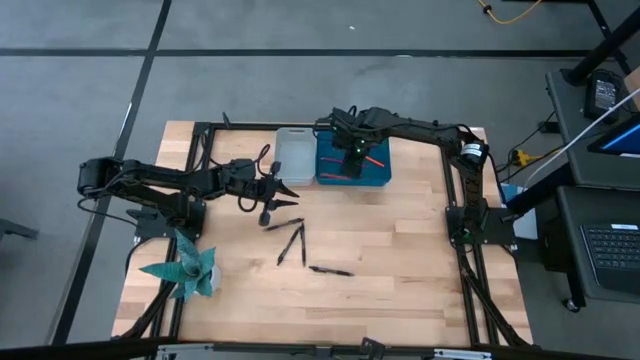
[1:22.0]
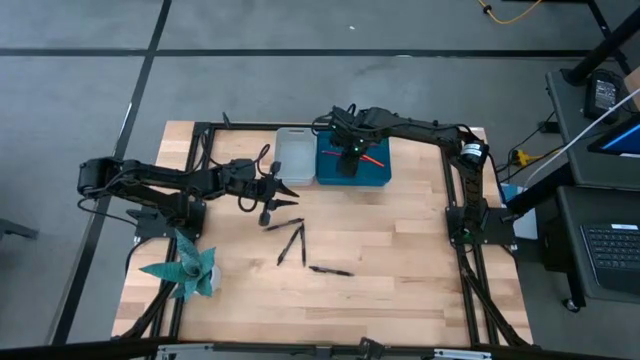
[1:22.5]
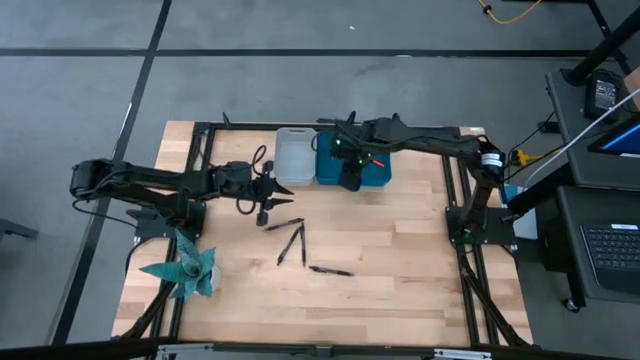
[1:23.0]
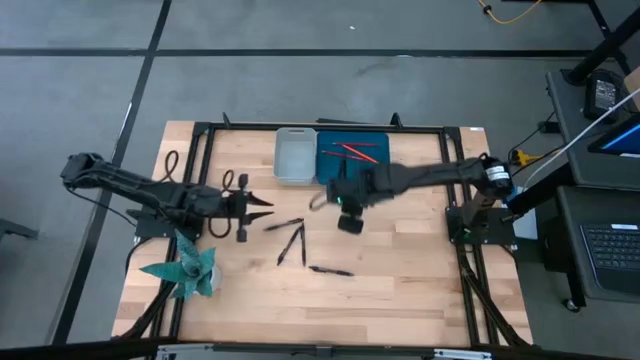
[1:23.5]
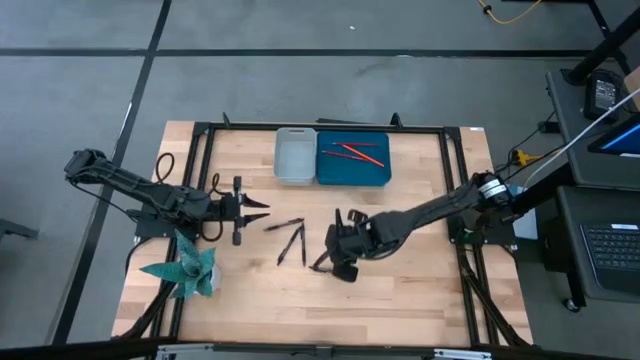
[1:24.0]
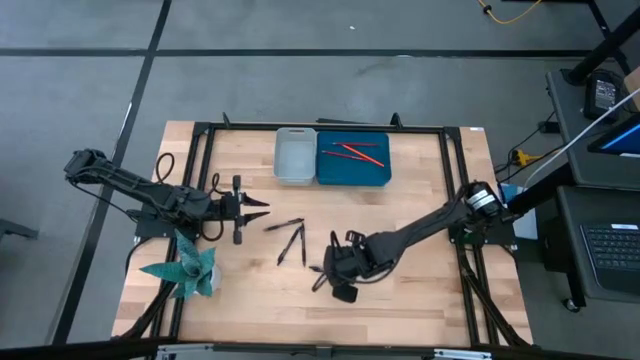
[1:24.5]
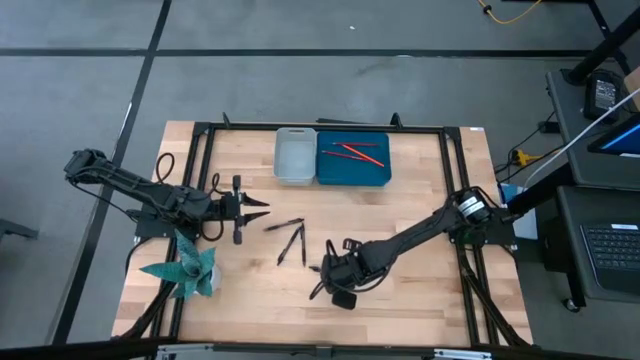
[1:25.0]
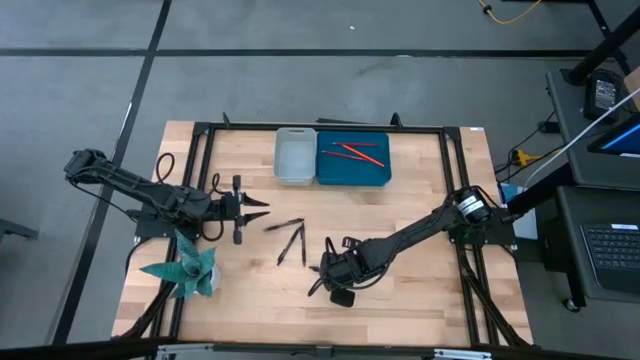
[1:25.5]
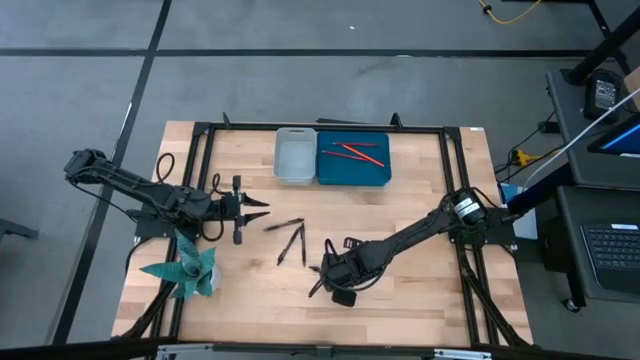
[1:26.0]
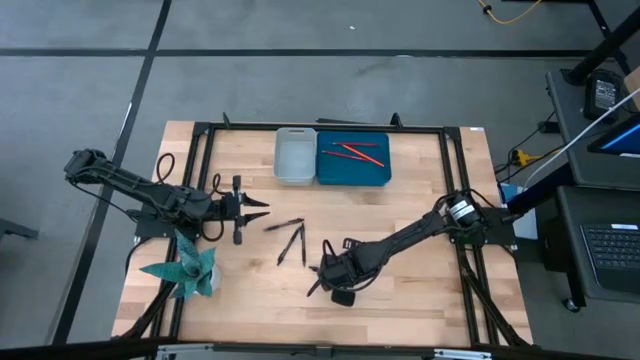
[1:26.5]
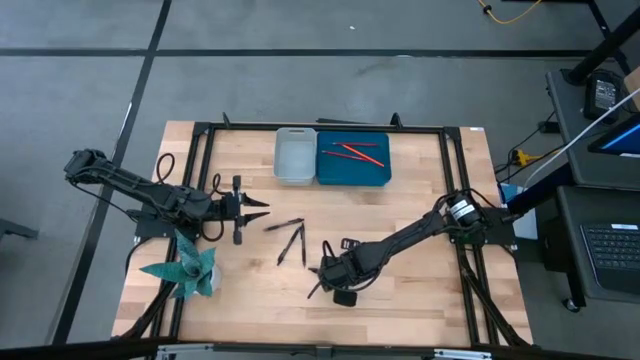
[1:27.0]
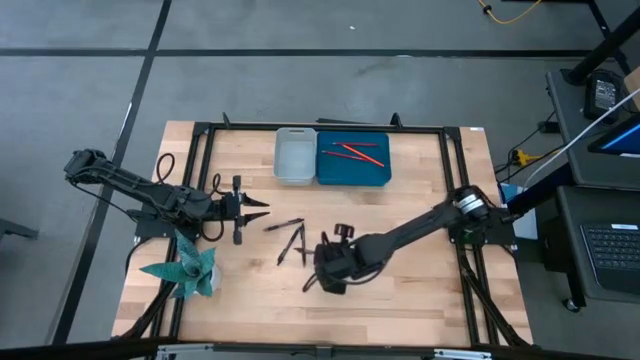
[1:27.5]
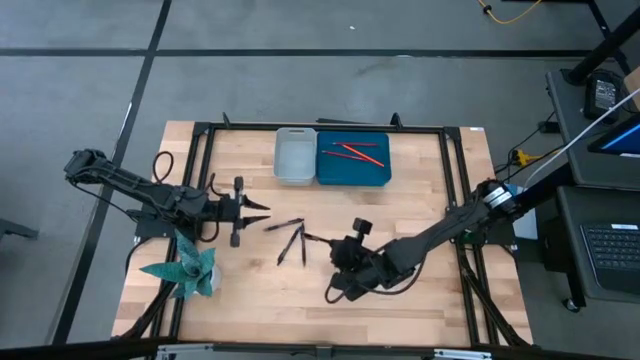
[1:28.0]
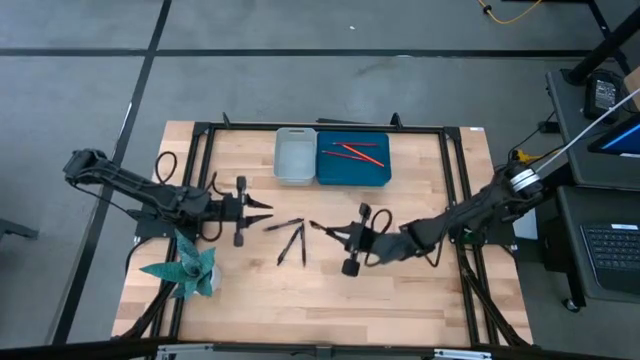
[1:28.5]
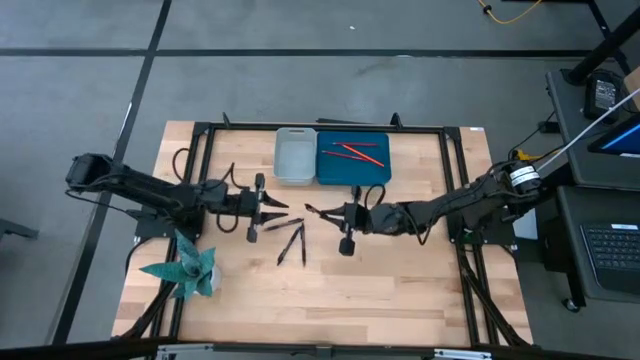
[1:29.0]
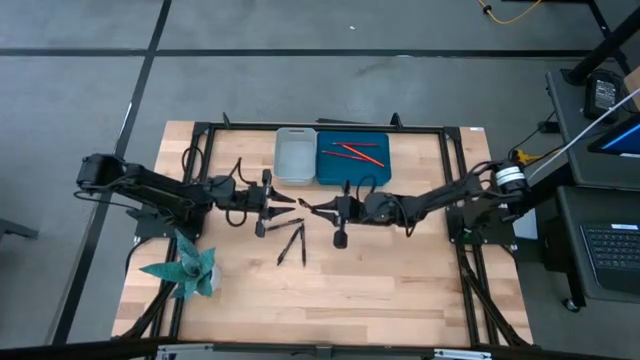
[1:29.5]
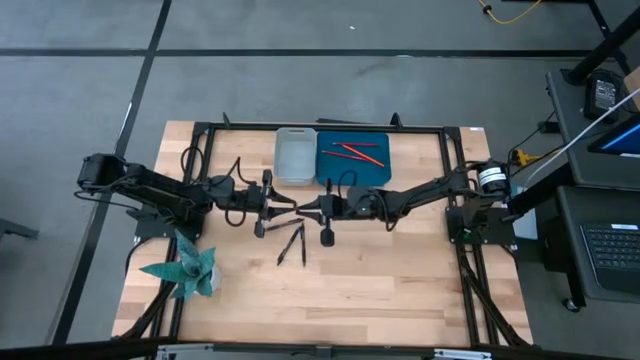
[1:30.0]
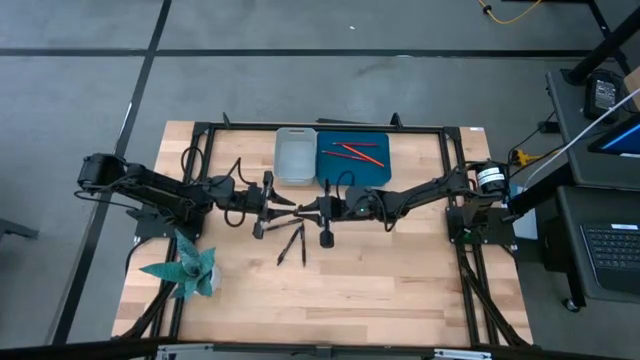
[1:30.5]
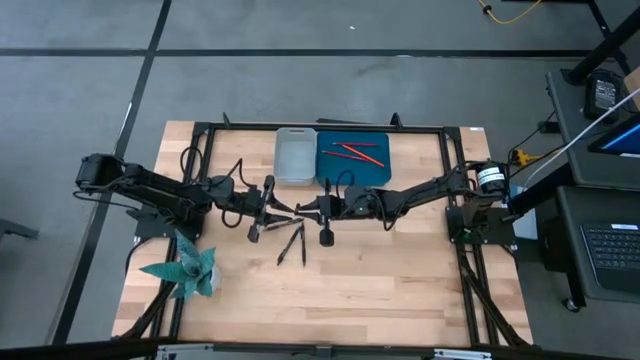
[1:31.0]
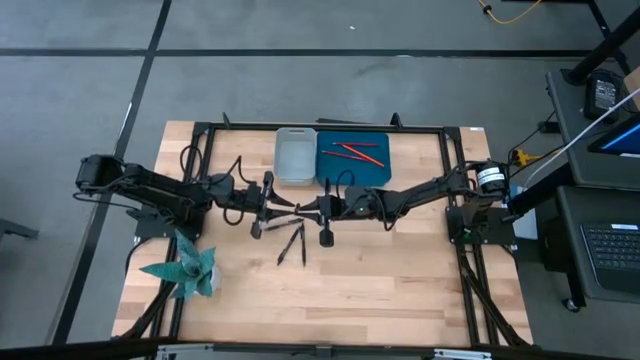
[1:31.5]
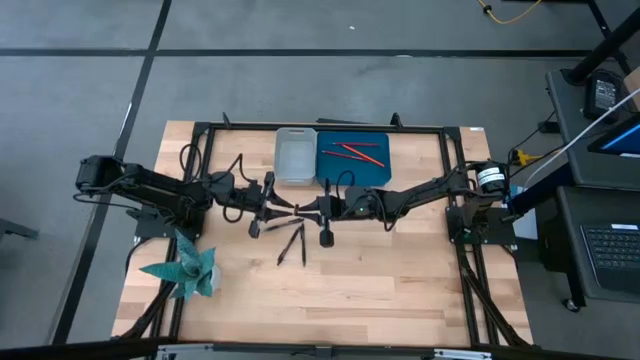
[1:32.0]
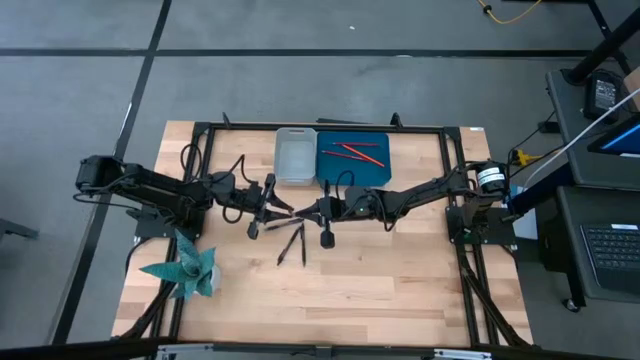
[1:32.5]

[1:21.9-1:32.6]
Task: Sort pens & pencils
Put the black pen into the gray bin

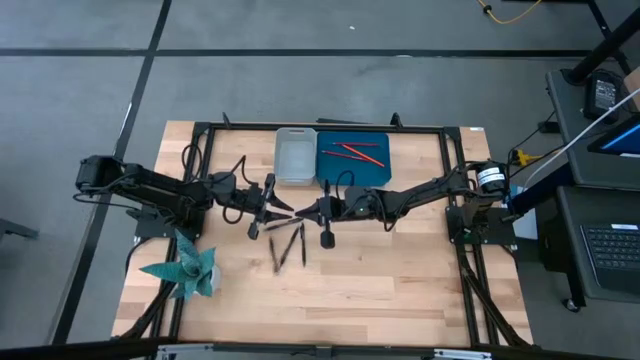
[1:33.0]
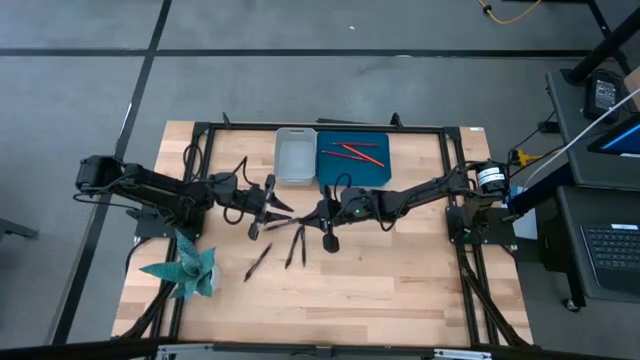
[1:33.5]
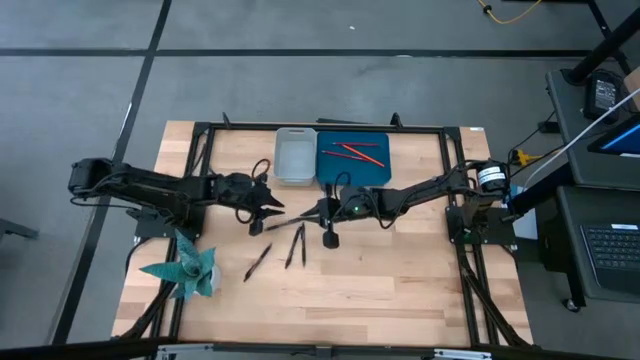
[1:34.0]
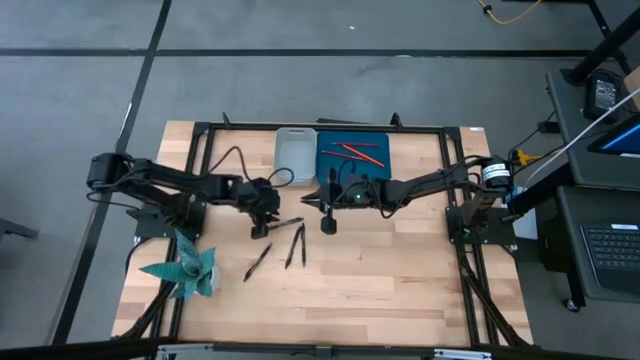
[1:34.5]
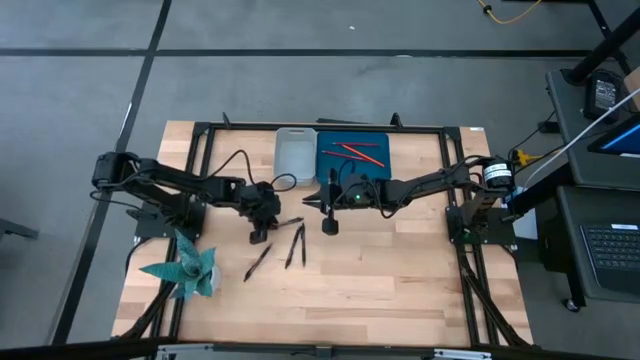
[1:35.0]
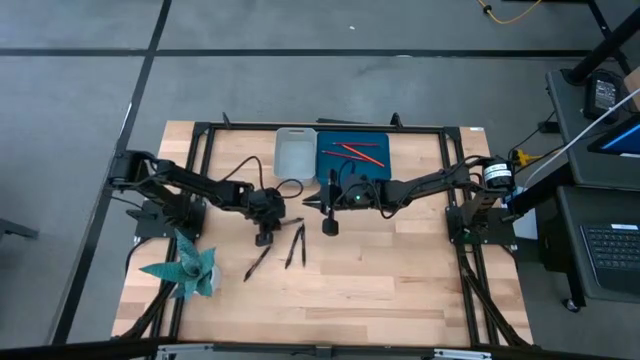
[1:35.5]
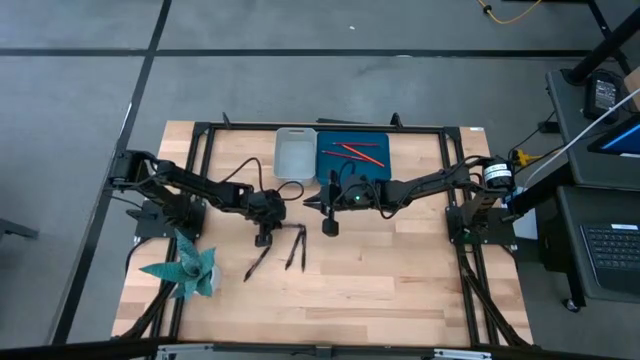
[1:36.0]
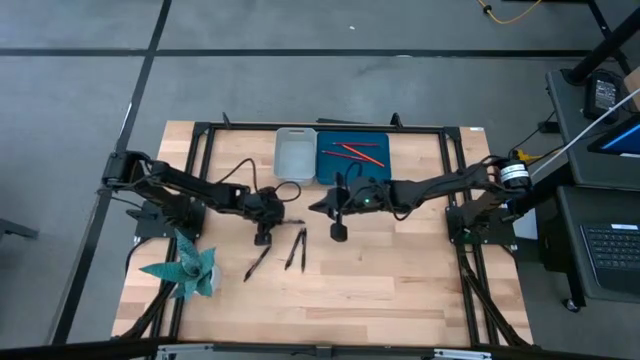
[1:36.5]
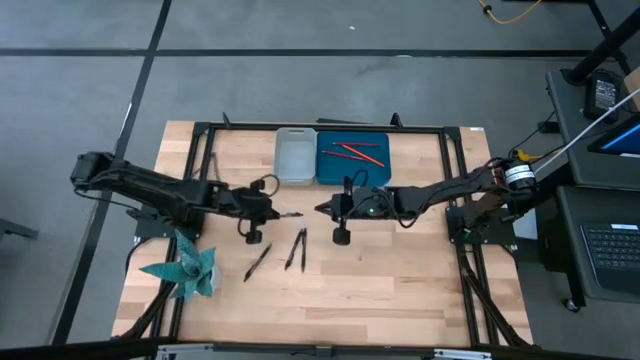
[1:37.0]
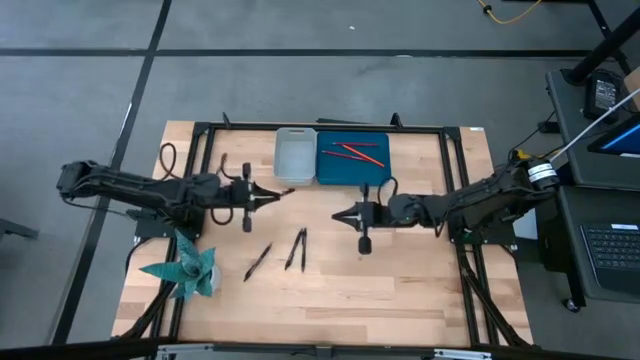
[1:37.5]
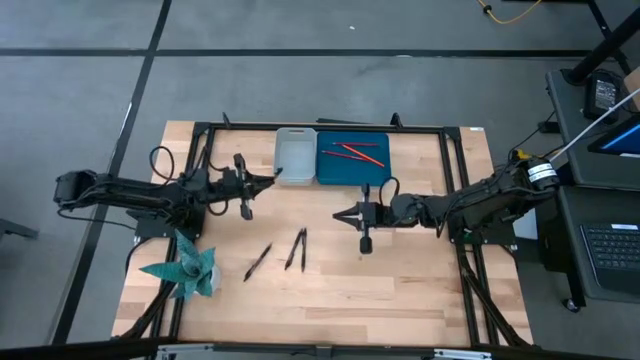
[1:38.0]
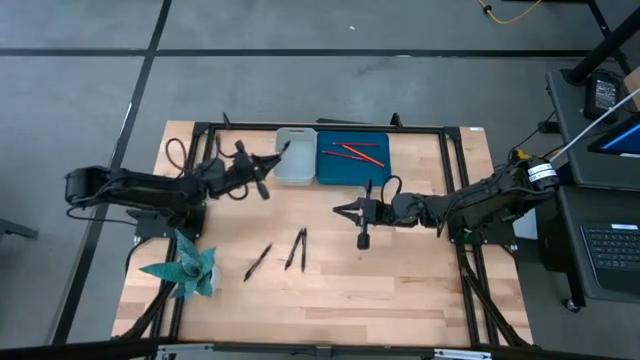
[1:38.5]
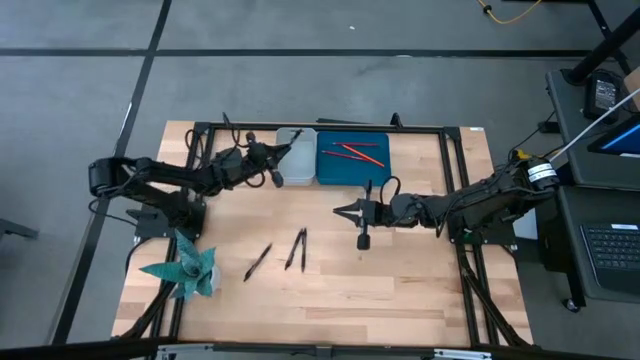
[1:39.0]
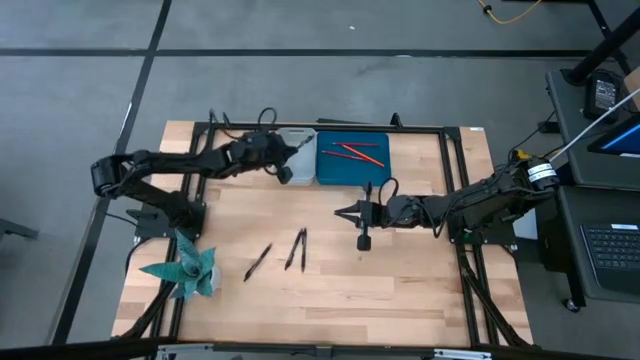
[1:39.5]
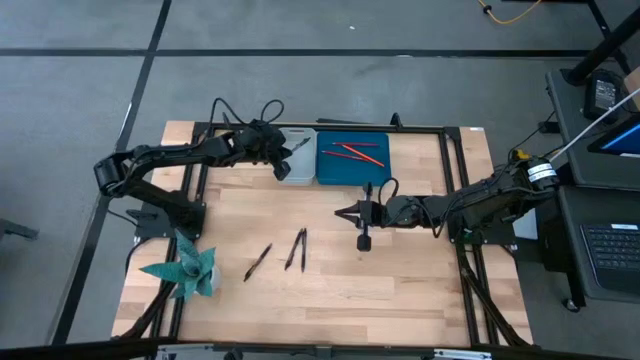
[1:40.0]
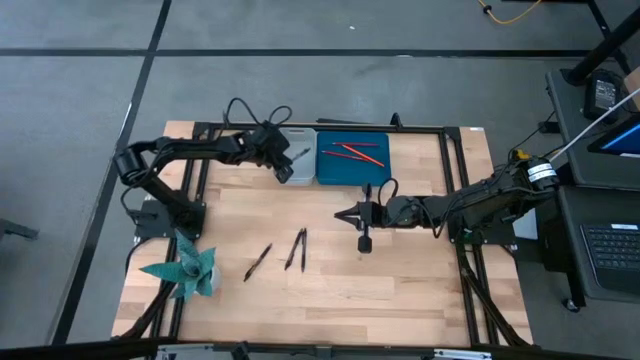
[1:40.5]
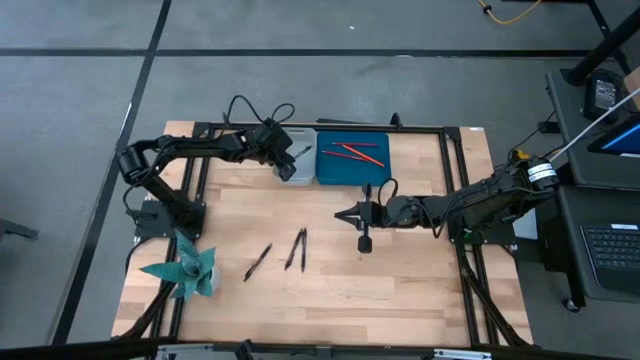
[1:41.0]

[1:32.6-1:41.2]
Put the black pen into the gray bin

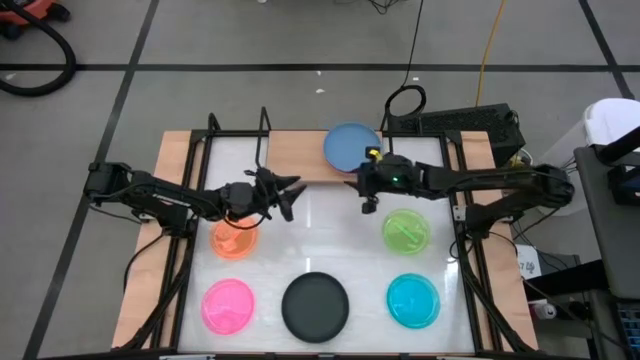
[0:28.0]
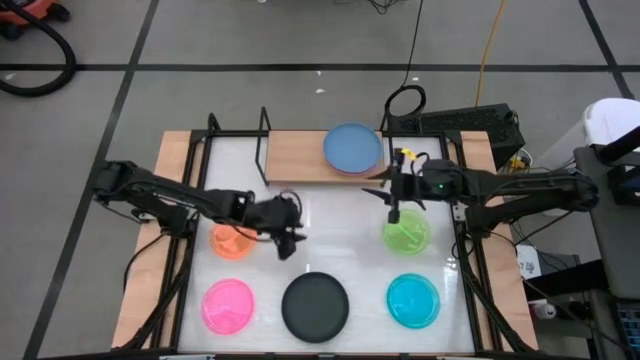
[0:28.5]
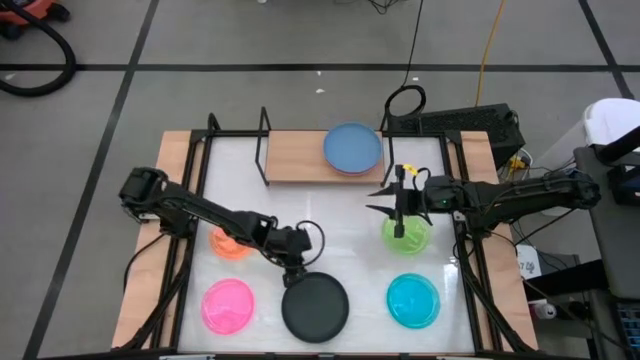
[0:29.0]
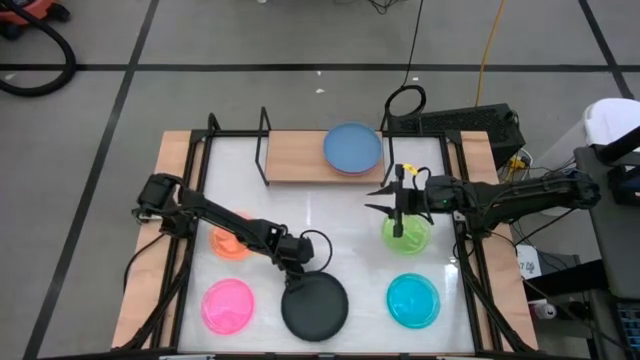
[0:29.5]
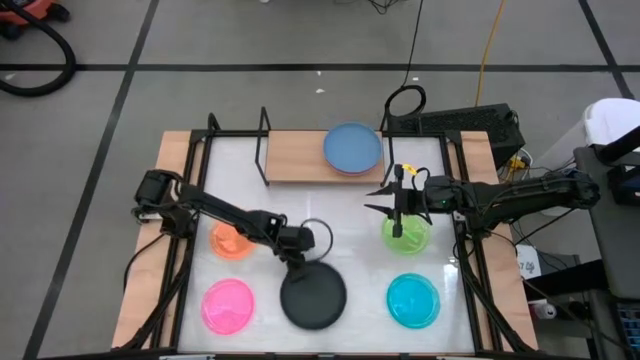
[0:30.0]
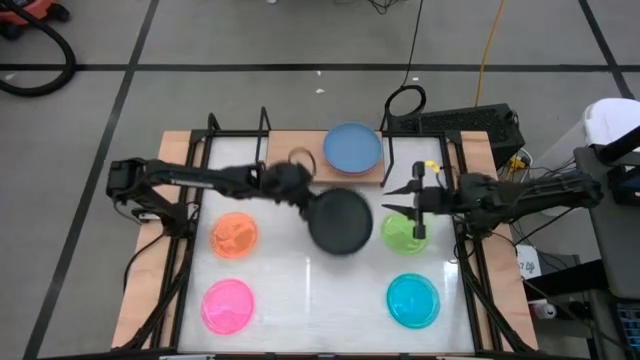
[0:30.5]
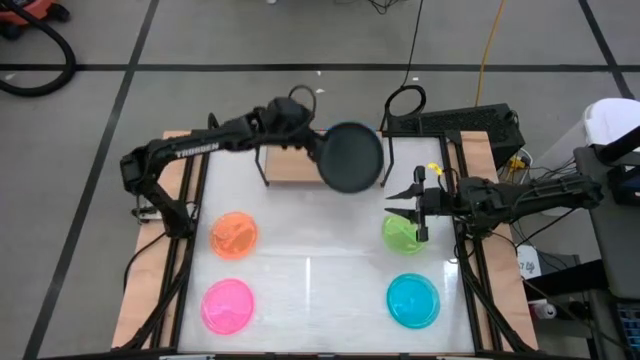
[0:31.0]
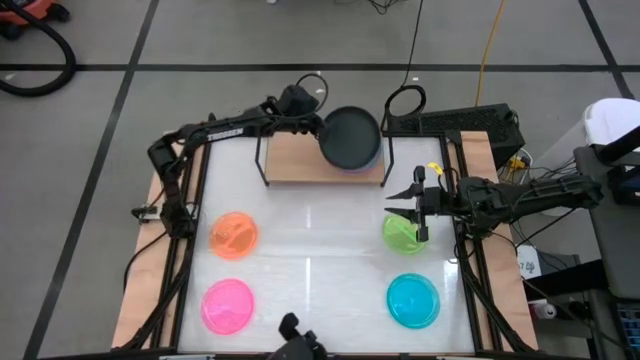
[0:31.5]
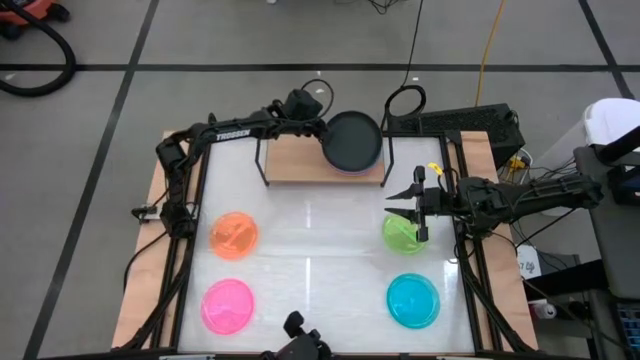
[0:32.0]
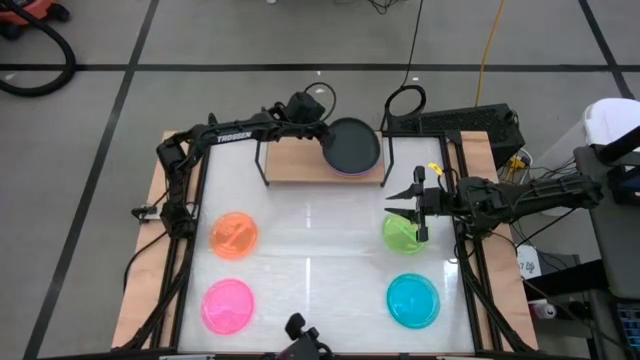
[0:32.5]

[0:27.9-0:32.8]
Task: Place and stack plates onto a shelf
Stack the black plate on top of the blue plate on the shelf
